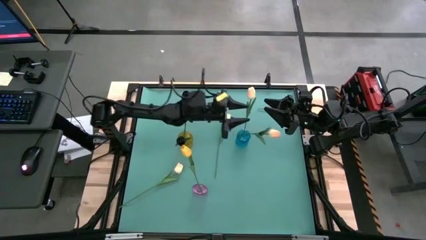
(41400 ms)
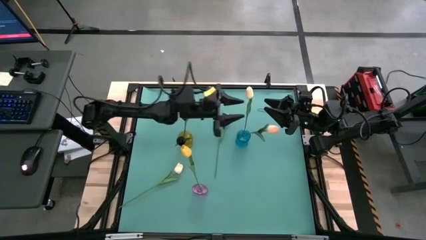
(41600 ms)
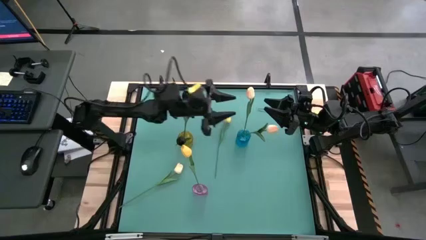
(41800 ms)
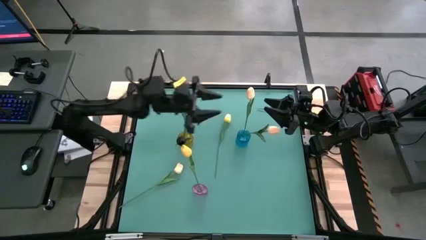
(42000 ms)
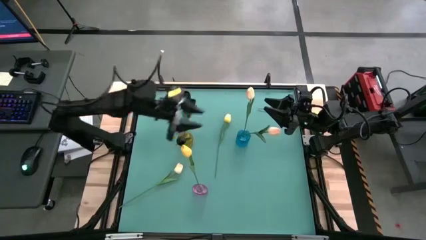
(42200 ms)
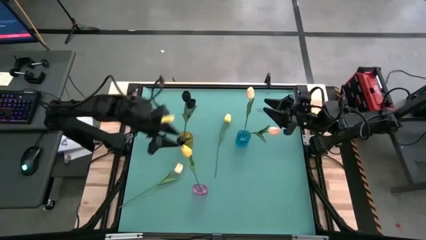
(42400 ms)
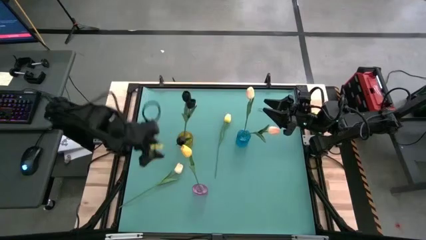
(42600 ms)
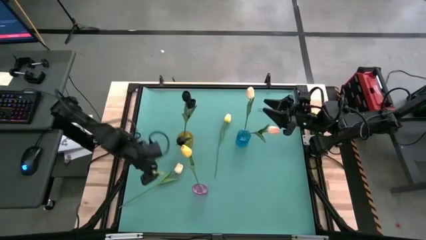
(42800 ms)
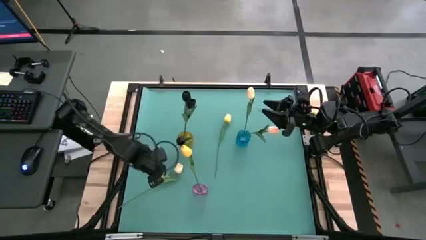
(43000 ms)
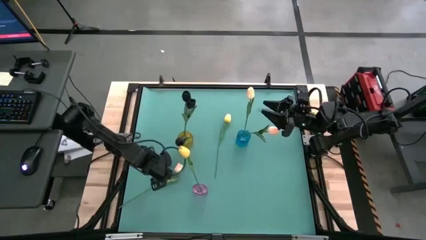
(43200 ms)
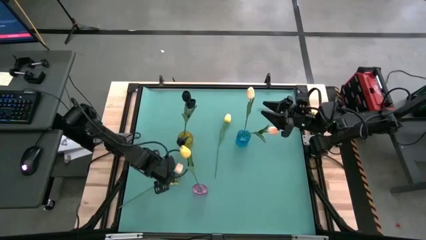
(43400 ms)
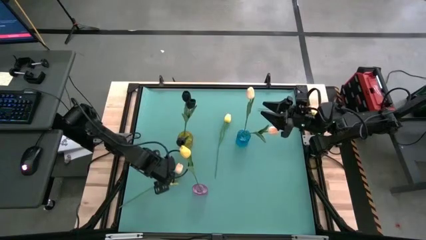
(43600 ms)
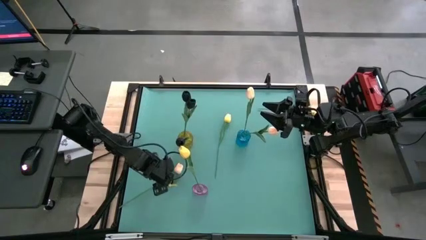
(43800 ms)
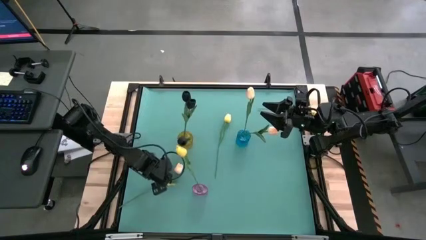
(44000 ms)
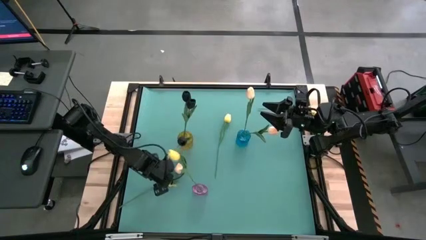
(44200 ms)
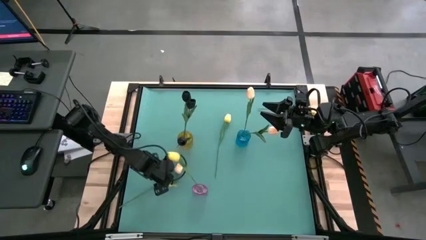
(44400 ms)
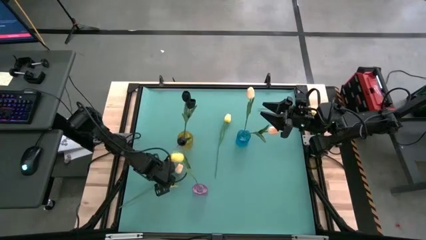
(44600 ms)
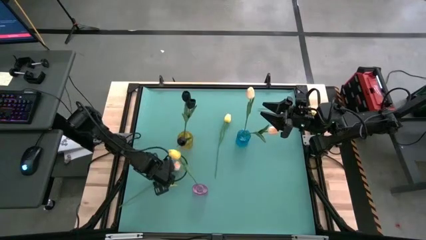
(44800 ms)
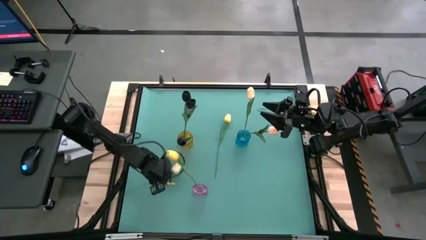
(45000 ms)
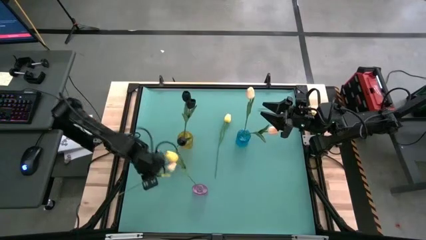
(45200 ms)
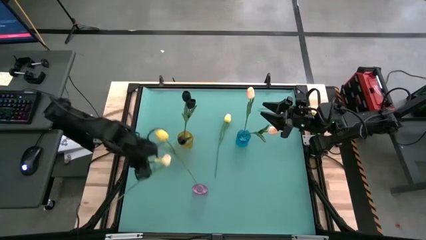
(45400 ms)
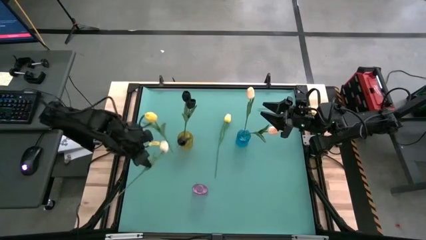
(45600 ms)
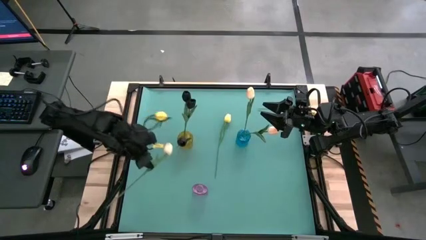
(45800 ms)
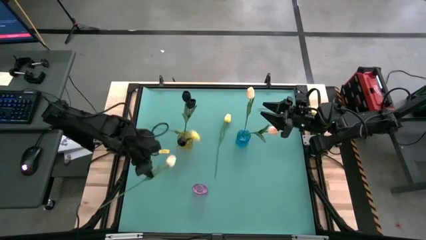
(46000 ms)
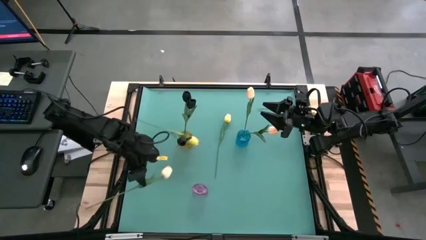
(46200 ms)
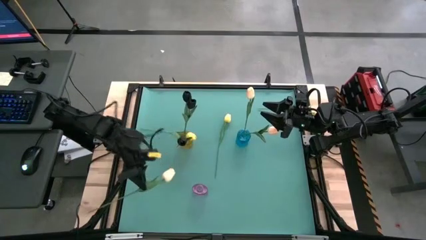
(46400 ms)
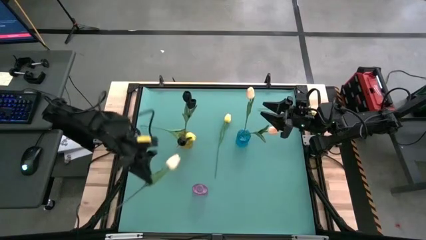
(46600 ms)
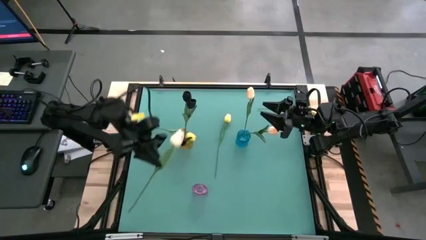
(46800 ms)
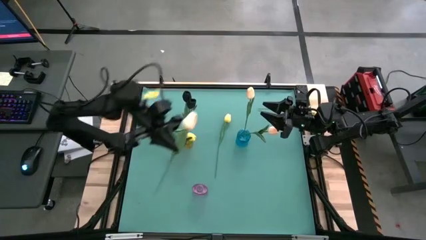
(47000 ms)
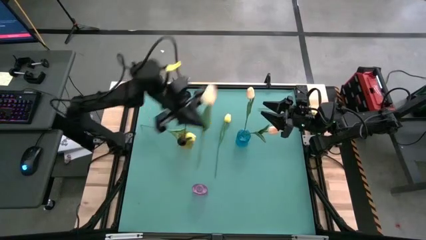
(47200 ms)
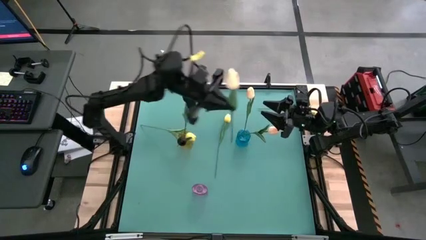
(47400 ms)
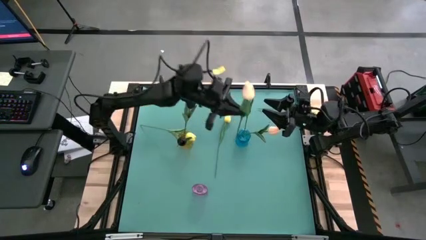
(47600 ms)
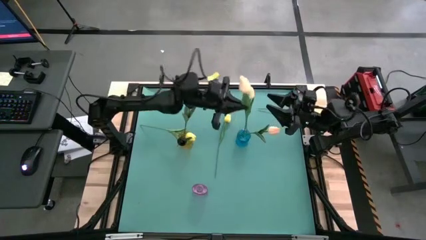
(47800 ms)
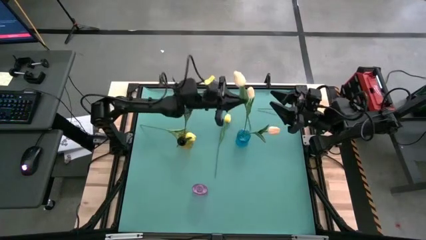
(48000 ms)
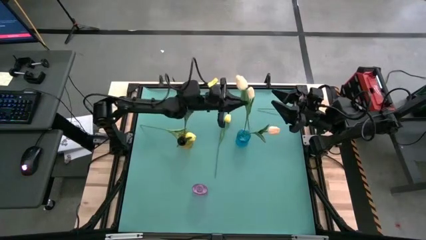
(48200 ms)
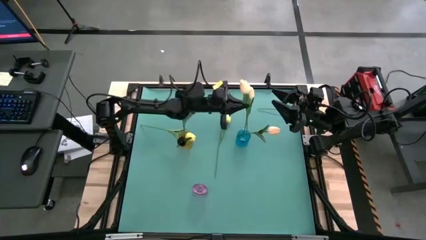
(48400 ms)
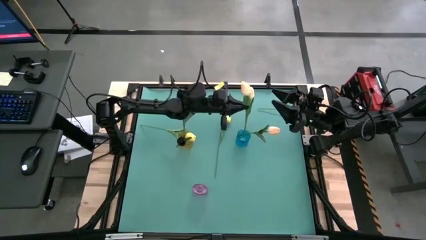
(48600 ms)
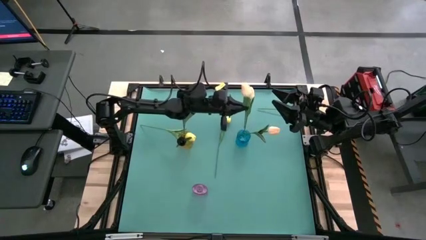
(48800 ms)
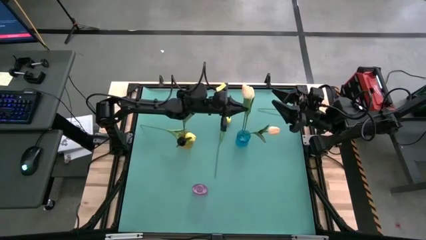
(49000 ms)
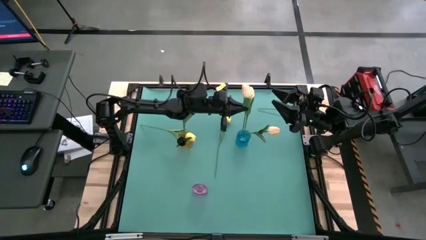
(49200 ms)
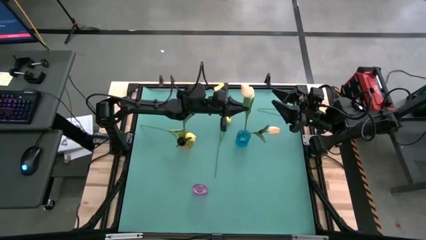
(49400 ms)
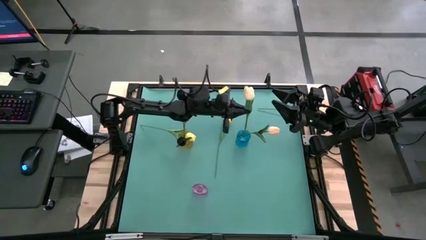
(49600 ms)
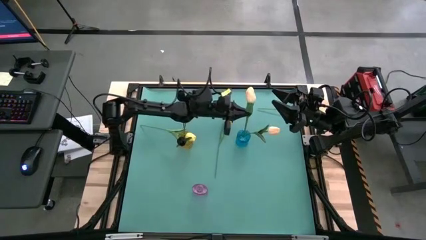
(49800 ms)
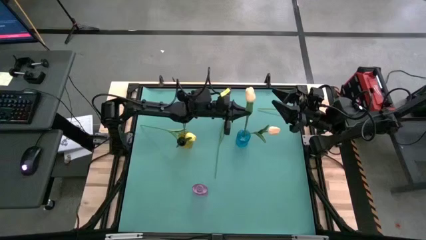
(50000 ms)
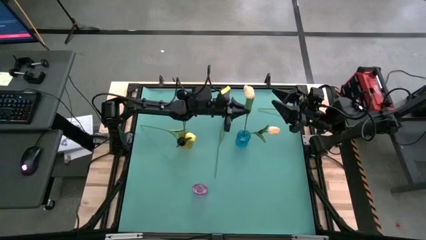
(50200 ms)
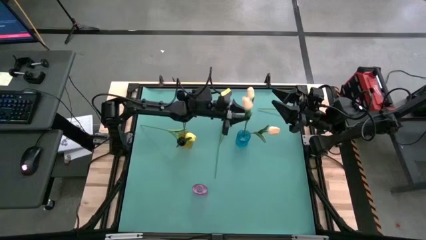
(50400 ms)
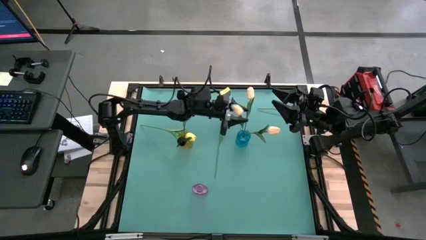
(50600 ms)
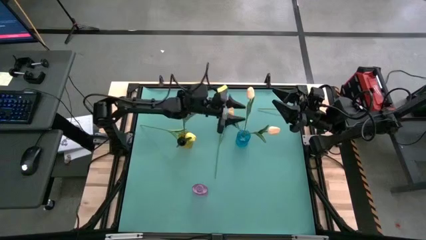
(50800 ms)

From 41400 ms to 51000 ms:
Task: Sort flowers into vase by color
Put the white tulip flower into the blue vase

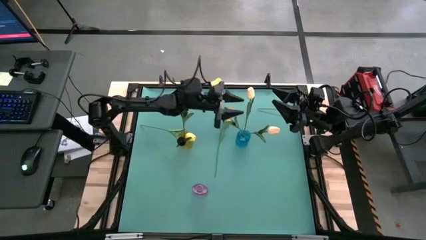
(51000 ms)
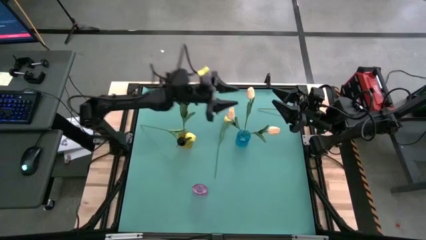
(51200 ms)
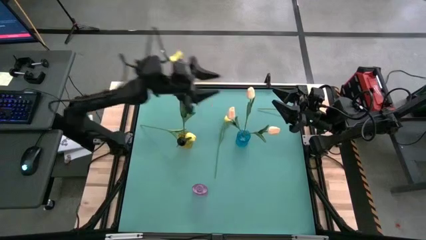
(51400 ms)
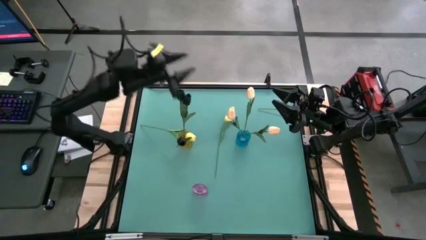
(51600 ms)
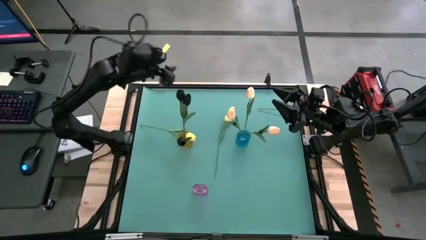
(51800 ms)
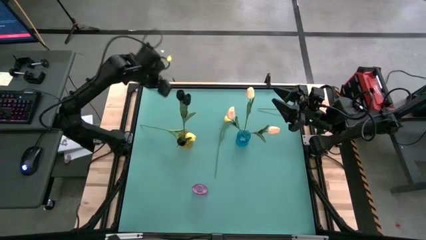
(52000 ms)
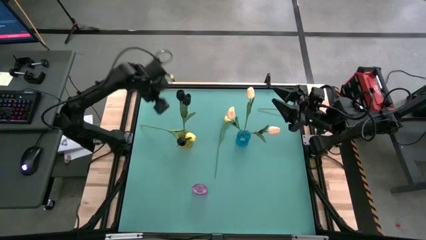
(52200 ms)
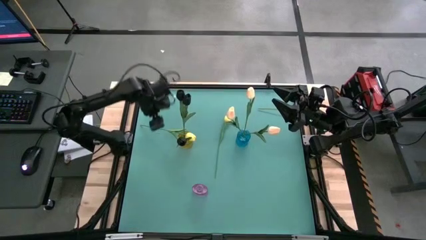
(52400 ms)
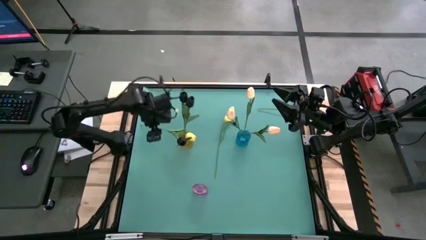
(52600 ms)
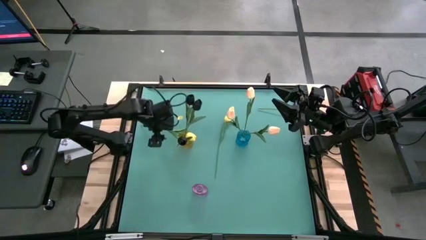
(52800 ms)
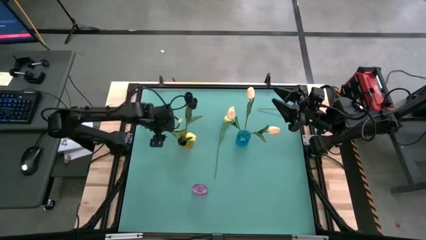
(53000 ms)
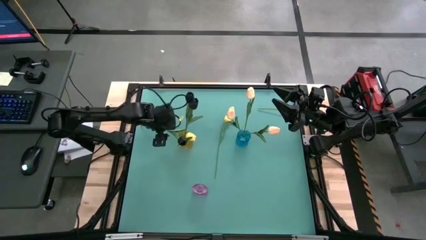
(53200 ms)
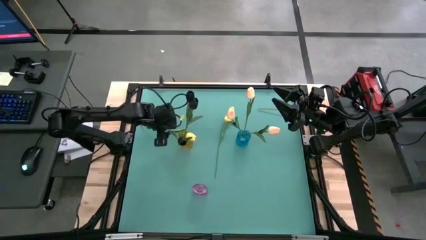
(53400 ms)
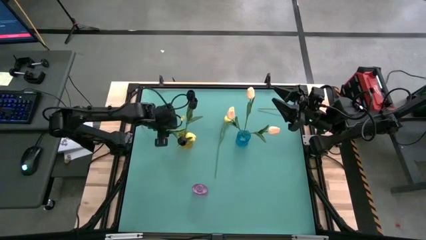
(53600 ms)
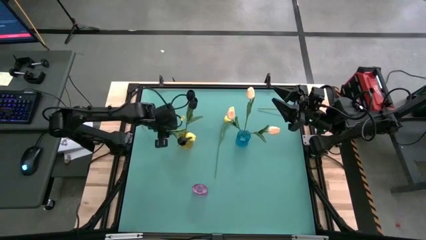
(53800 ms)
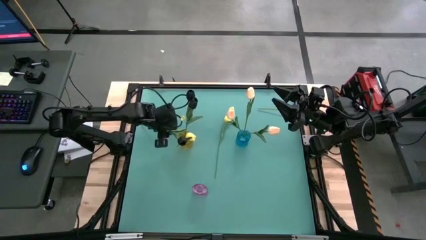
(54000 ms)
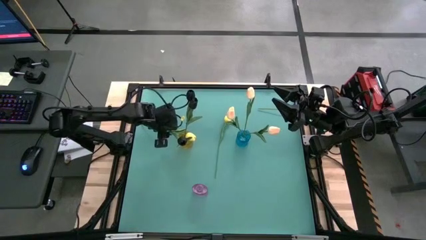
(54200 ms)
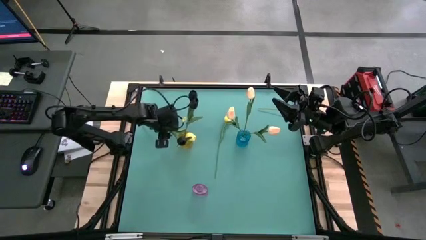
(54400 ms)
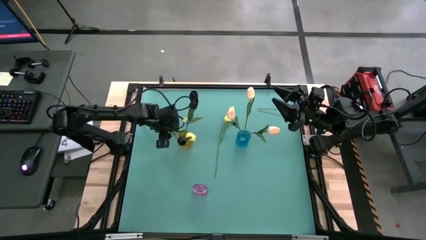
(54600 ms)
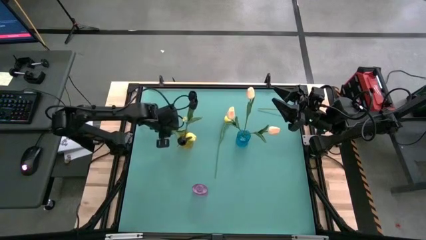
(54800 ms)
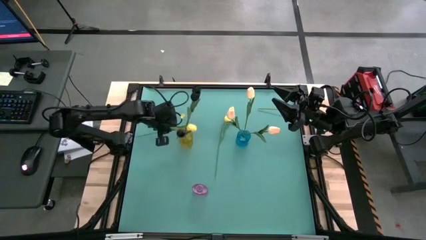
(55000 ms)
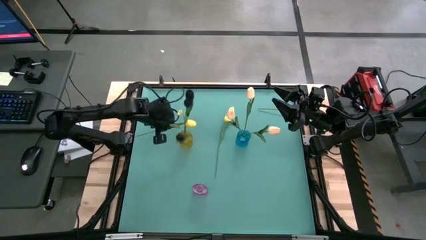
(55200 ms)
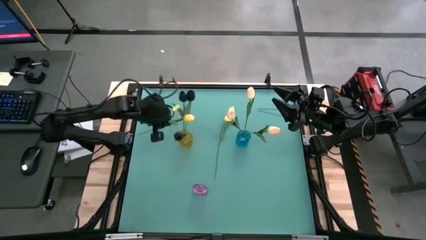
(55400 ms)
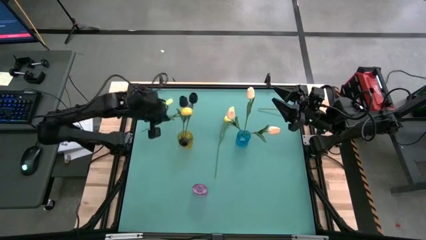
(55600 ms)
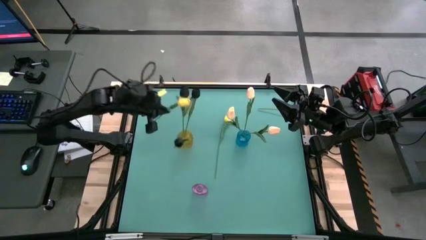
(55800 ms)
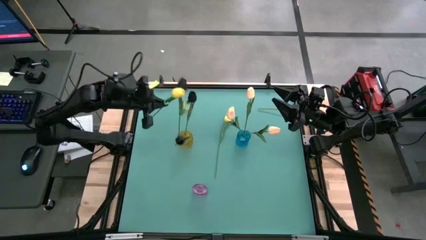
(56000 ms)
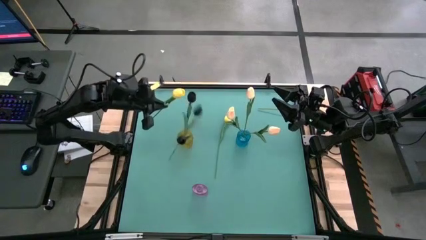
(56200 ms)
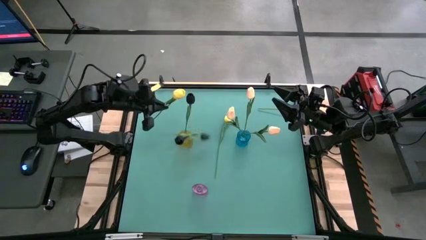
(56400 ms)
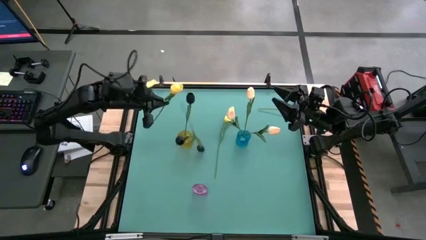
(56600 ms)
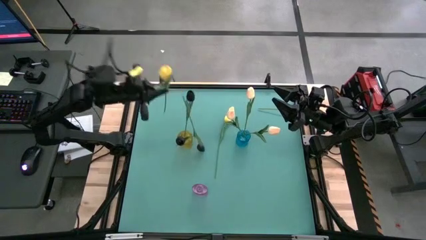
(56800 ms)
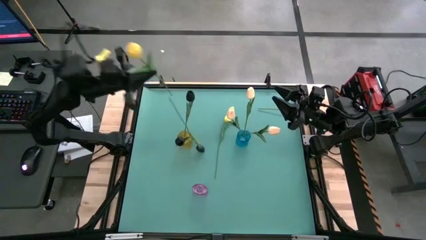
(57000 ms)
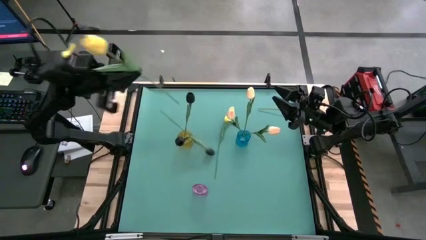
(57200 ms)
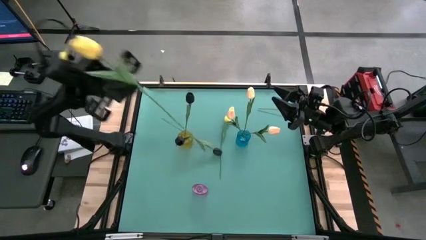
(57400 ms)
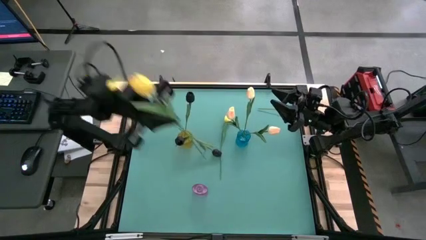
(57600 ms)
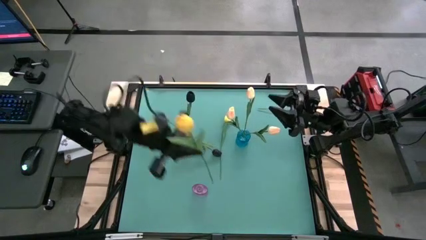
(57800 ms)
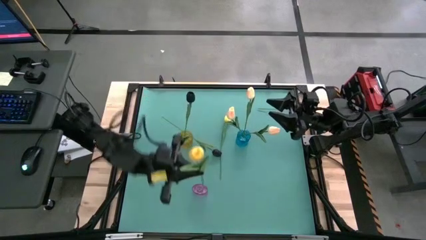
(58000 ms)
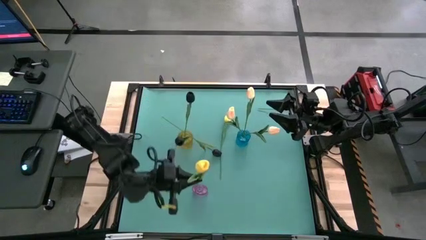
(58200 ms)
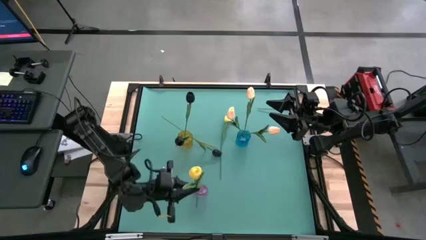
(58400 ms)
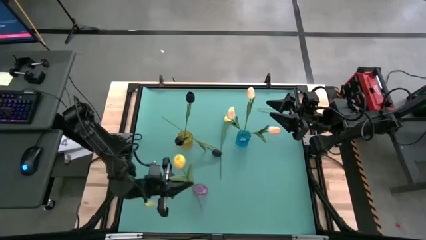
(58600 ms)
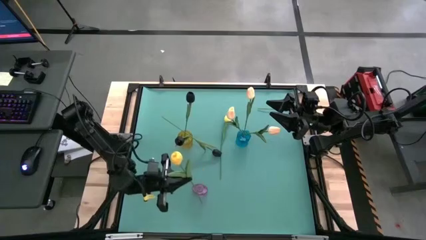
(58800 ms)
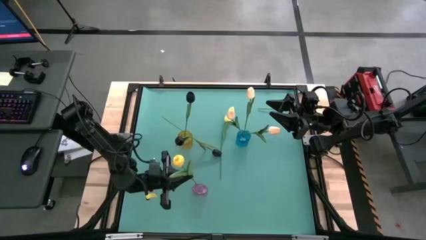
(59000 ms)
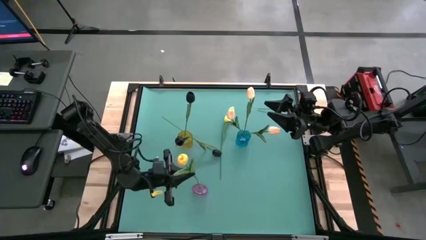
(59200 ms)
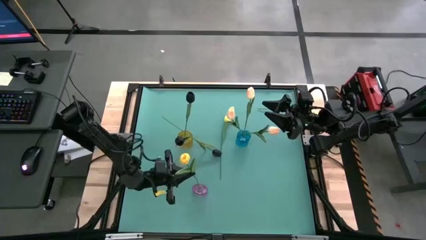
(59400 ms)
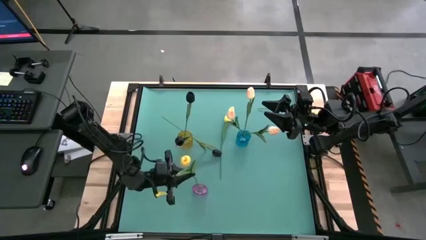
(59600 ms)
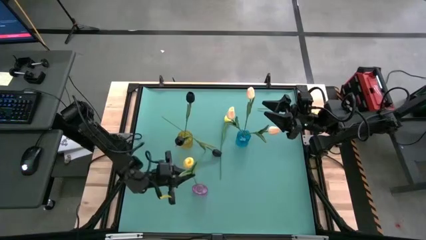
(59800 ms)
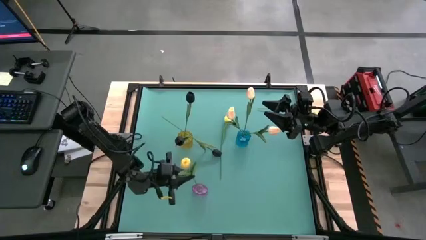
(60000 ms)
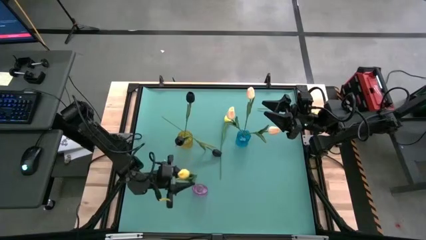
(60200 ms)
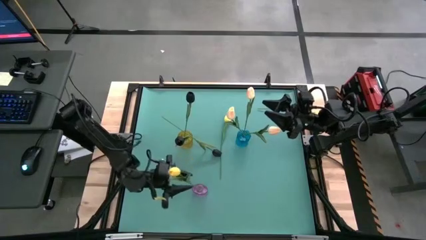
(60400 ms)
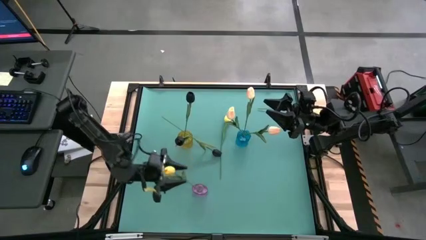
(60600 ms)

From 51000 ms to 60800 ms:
Put the left yellow tulip flower into the purple vase
